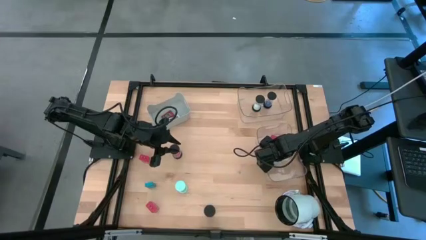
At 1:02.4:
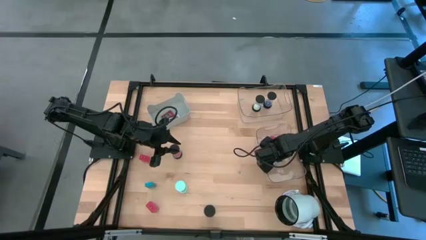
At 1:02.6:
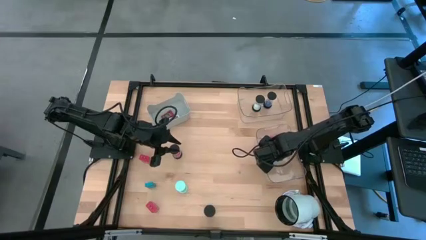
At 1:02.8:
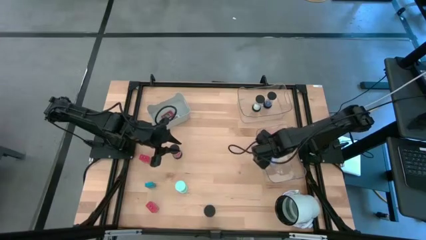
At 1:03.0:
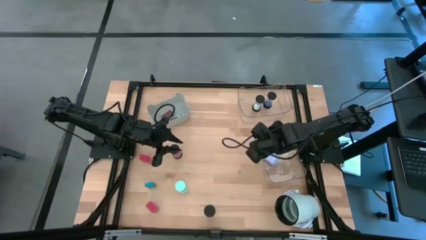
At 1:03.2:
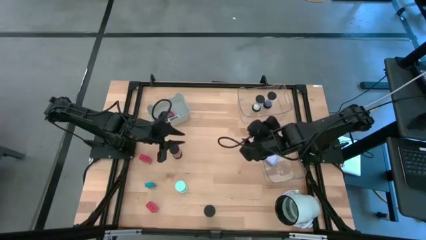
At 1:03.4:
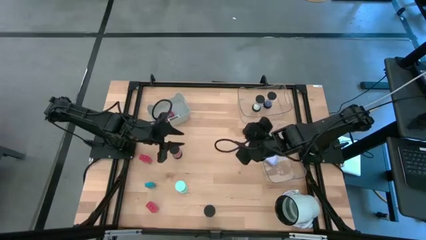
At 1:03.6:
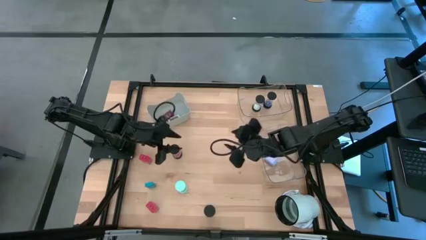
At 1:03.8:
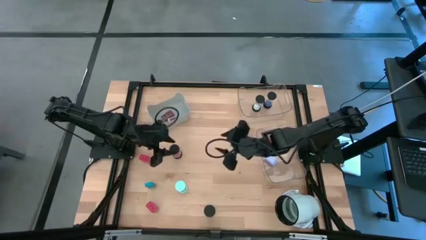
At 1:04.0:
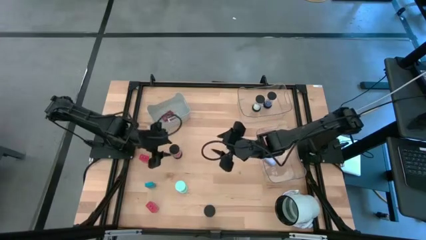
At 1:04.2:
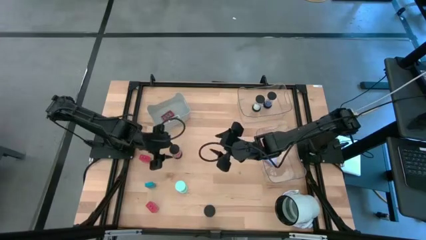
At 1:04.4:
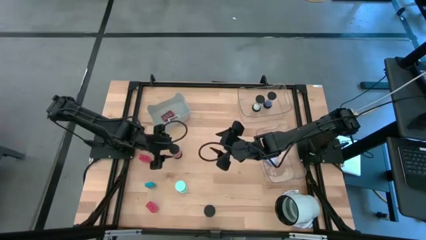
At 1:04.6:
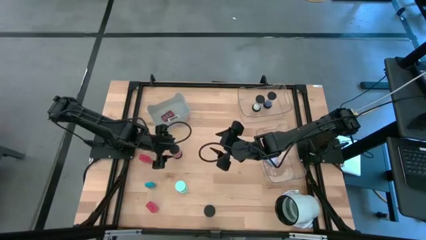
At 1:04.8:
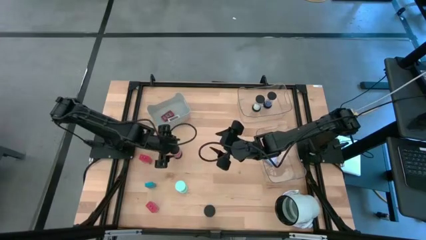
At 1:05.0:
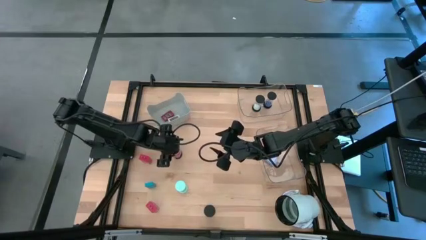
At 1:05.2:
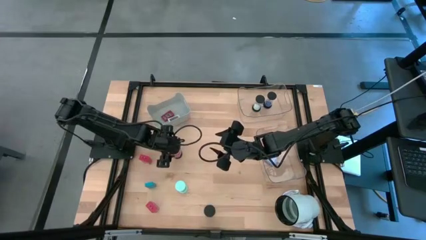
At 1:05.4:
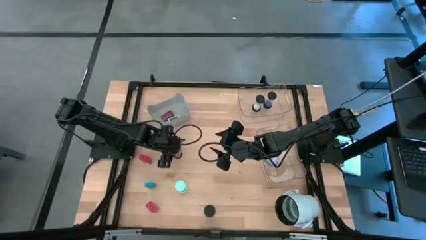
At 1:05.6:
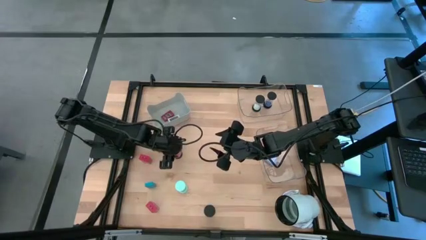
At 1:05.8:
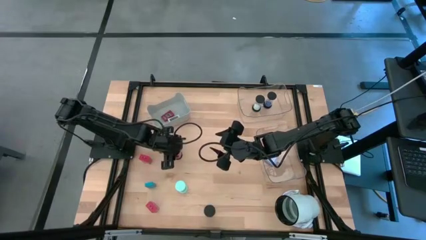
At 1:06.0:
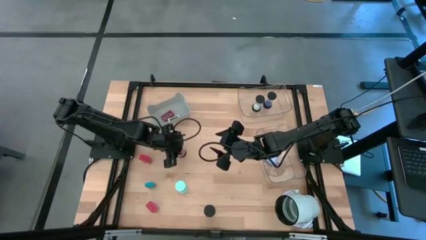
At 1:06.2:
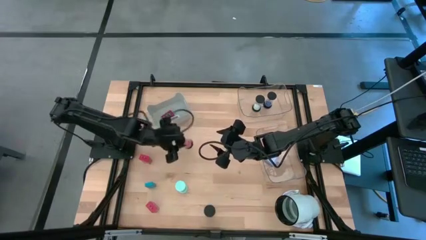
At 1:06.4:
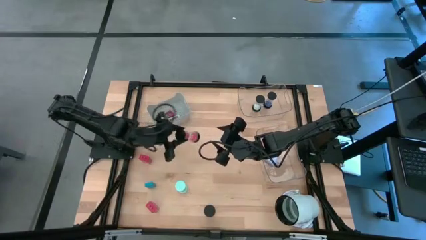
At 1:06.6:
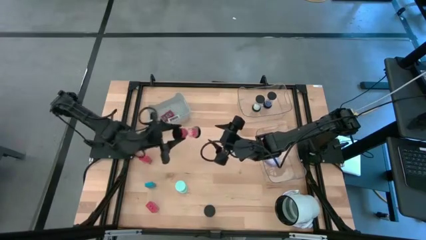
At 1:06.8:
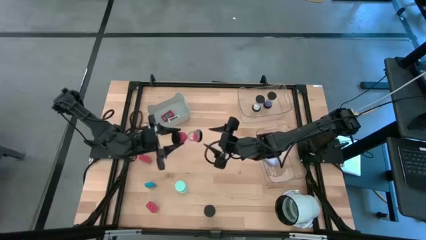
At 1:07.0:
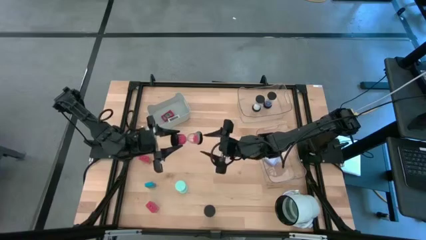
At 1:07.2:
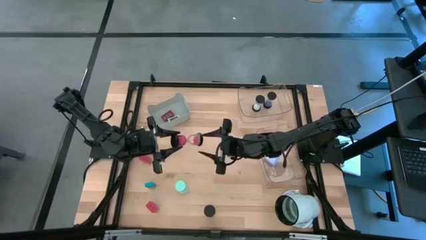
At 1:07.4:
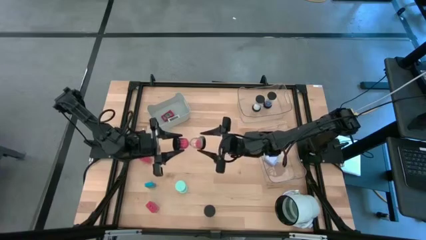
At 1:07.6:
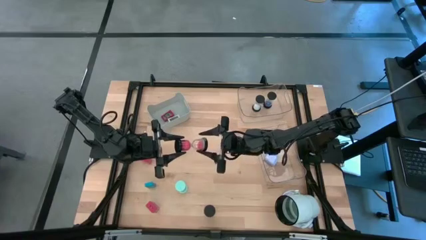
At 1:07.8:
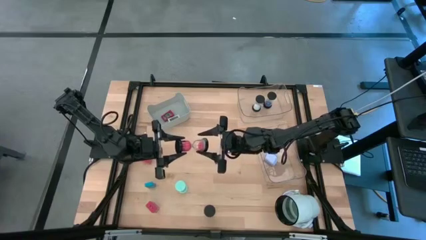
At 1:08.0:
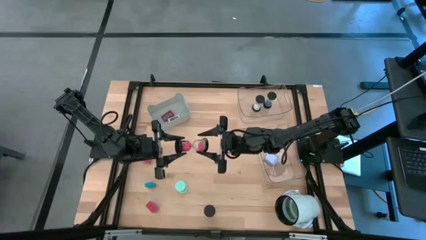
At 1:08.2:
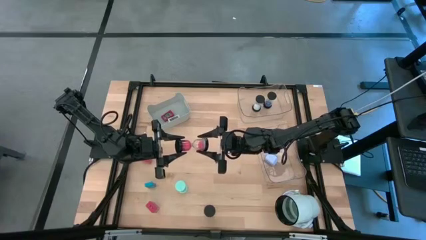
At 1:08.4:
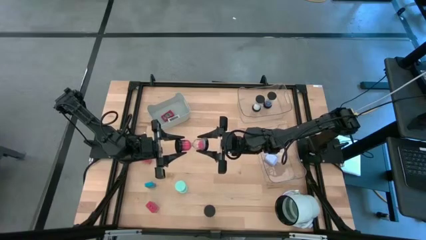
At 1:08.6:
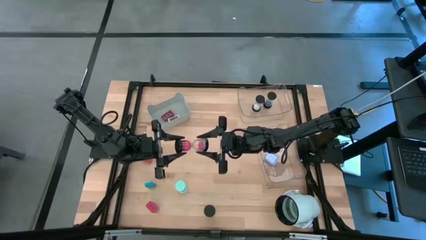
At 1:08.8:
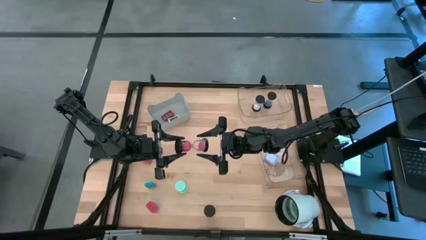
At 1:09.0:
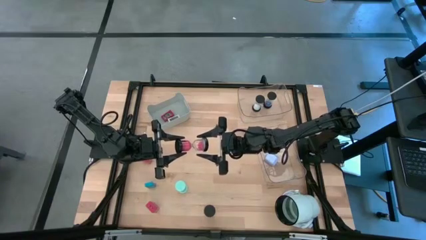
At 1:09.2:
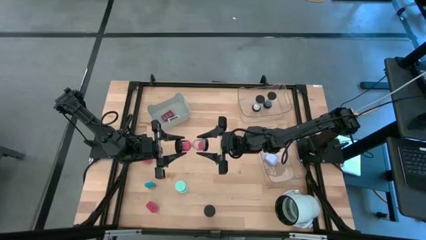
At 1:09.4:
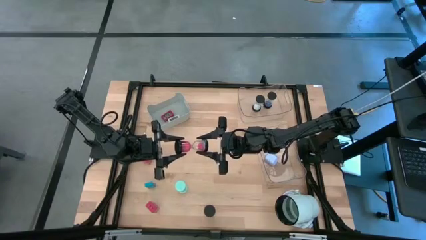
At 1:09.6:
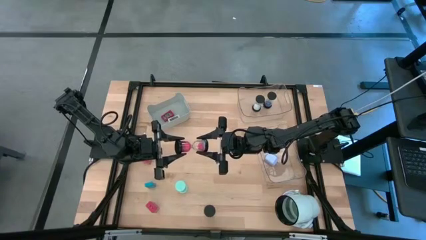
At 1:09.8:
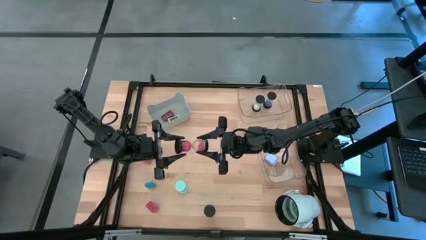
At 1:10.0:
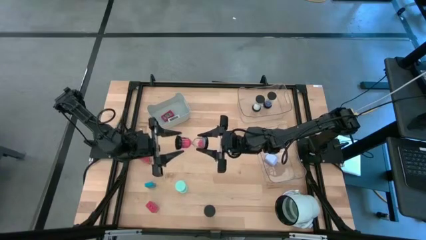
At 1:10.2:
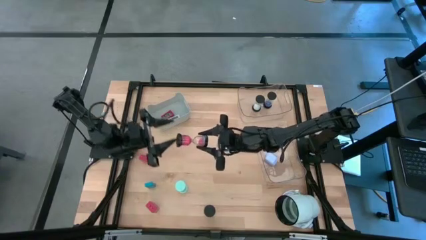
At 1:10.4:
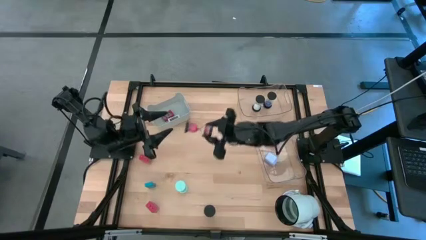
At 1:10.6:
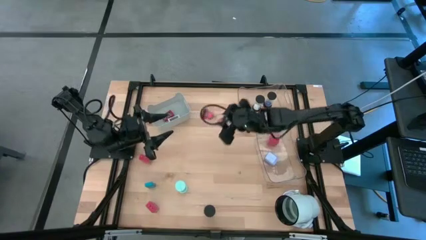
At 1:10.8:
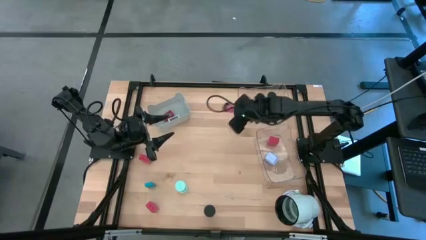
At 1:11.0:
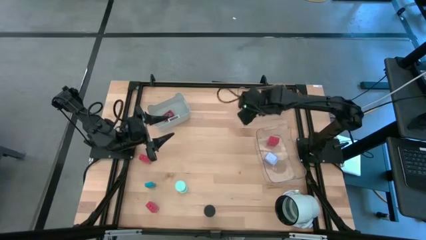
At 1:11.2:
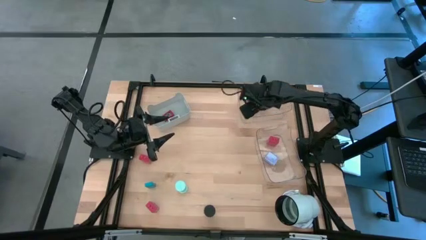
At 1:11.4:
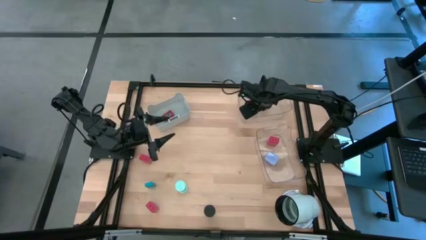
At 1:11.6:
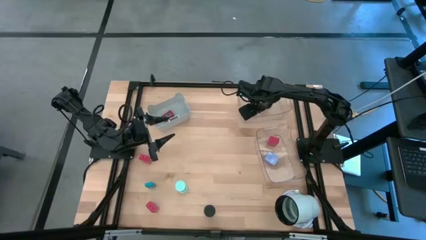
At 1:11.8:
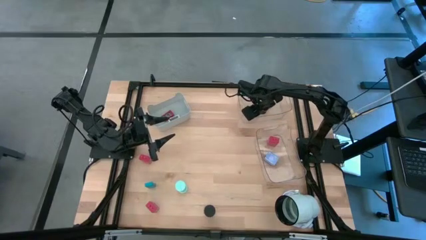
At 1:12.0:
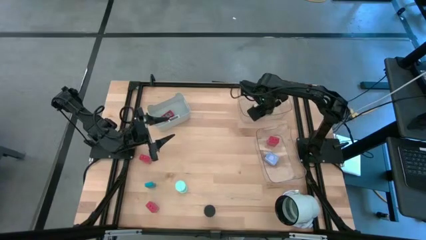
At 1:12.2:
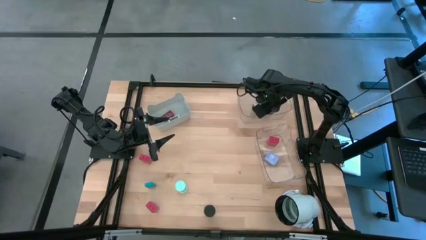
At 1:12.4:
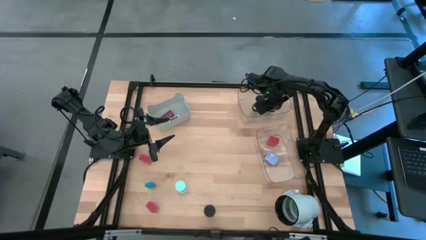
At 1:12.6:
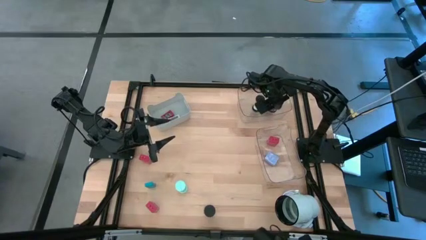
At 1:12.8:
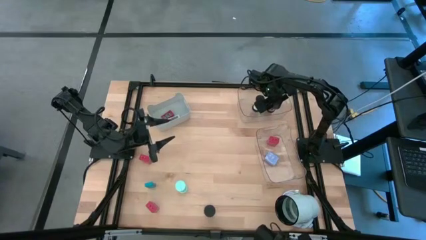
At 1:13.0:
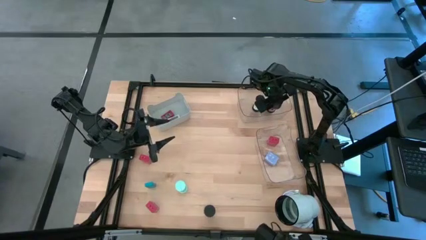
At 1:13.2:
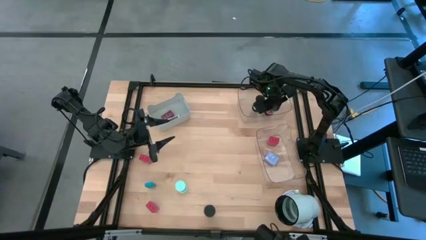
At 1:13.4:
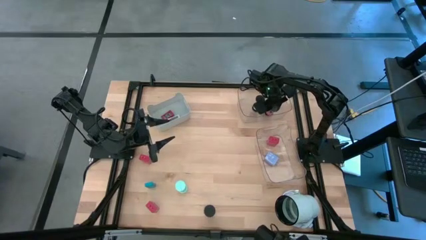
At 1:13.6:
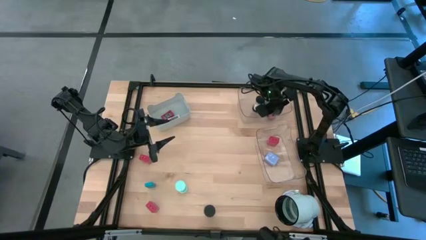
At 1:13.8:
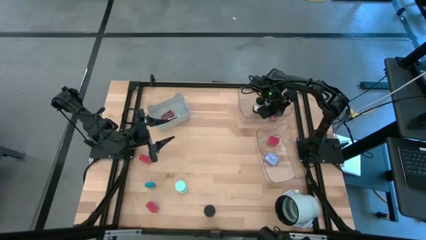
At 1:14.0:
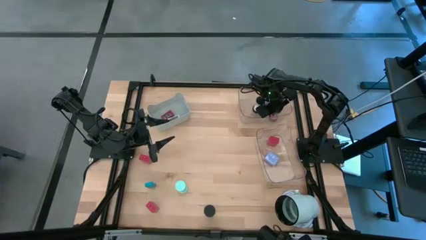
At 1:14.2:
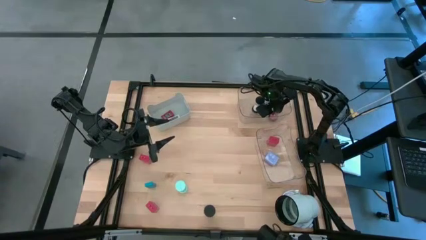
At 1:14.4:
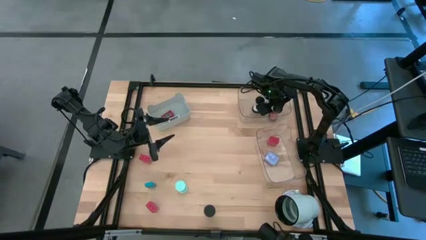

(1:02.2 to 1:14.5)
Task: Pick & Place Office items
Put the orange hourglass into the top transparent bin

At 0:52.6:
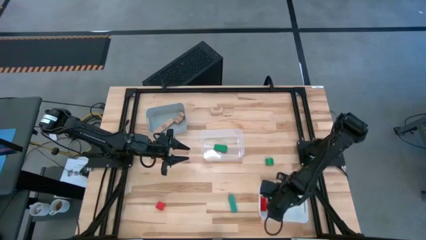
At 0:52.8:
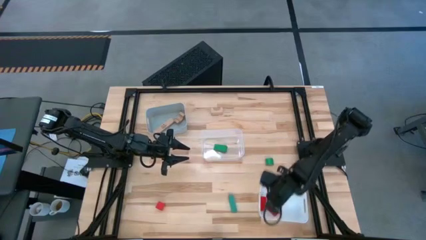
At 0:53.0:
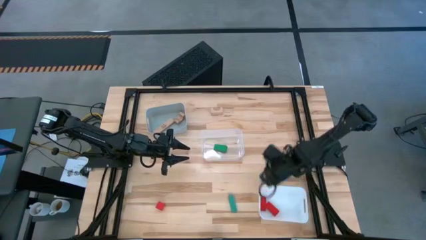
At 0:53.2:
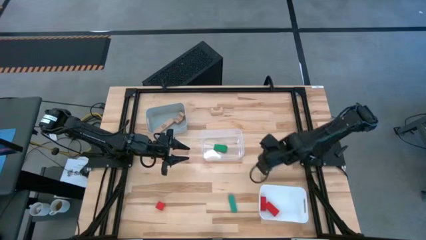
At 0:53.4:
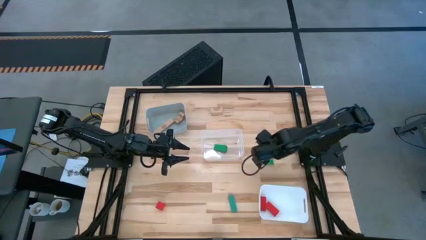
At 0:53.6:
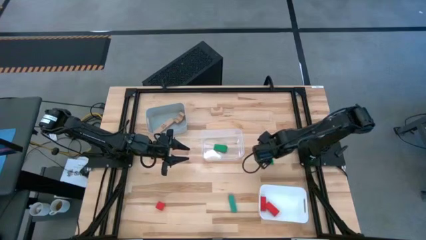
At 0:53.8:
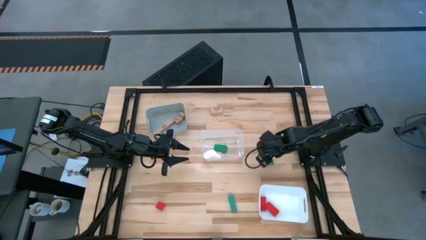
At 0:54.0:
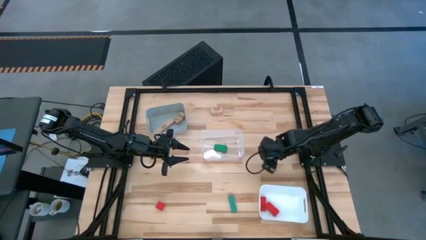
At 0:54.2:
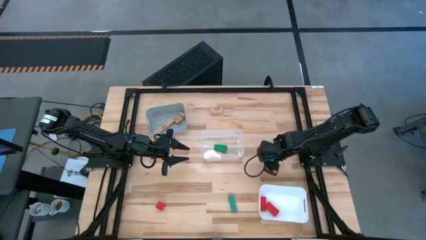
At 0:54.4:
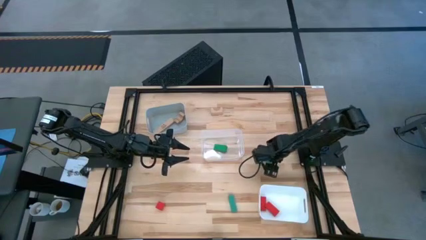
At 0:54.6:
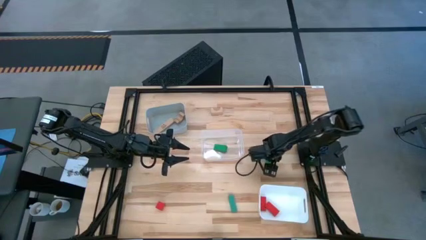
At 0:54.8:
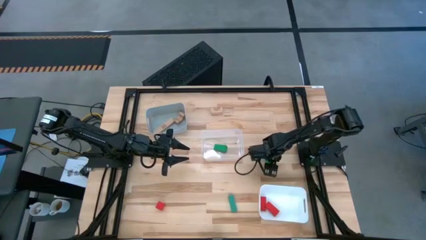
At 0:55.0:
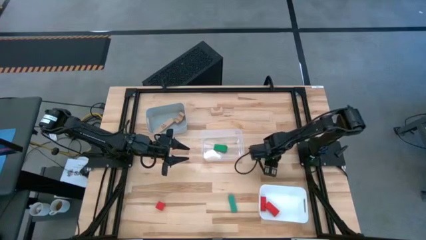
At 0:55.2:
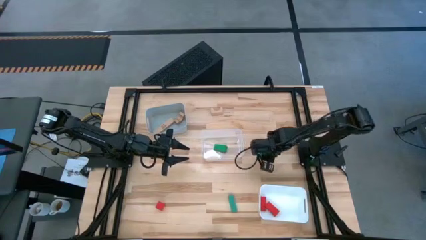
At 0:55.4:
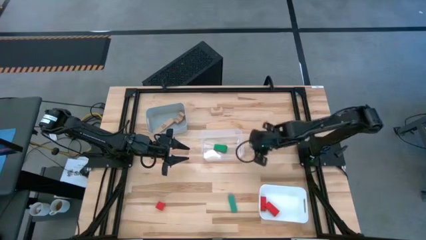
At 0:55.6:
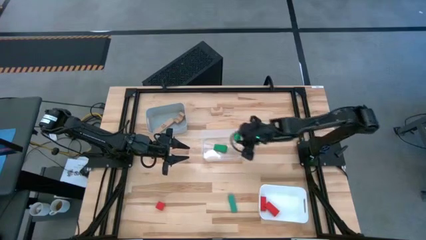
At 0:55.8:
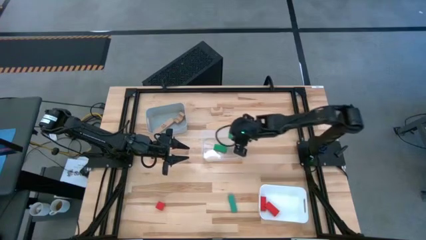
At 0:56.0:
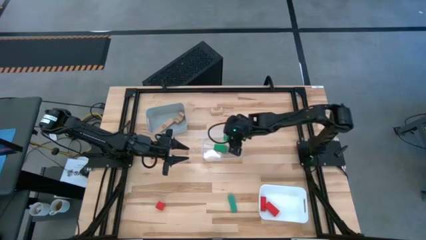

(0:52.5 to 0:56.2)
Task: Sort & place blocks by color
Put the top green block into the transparent bin
